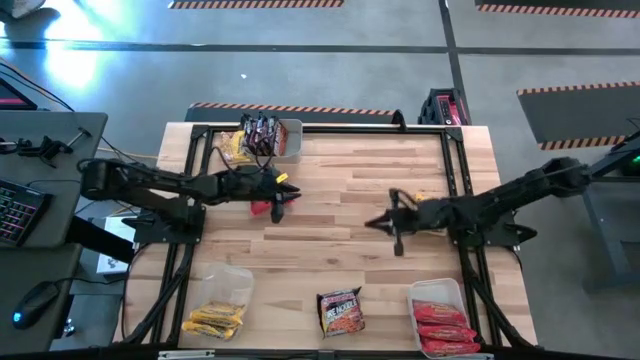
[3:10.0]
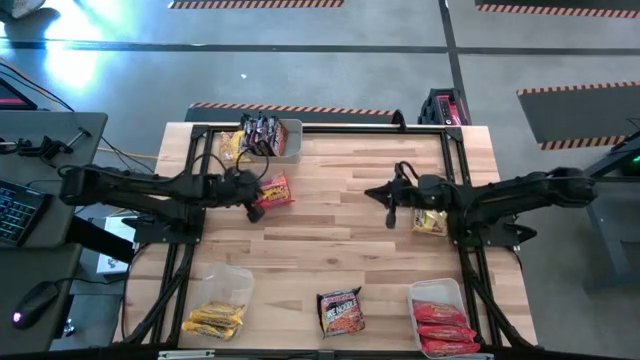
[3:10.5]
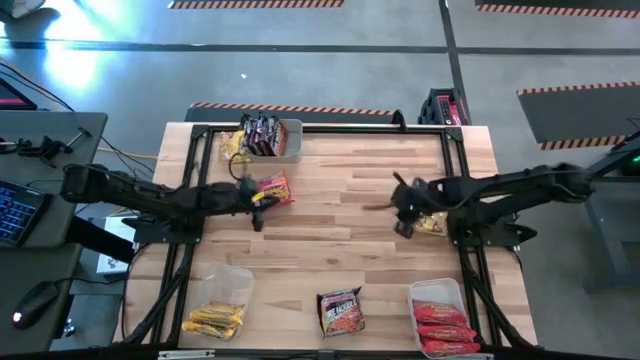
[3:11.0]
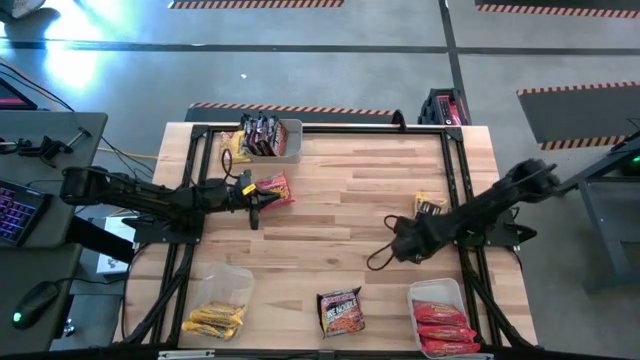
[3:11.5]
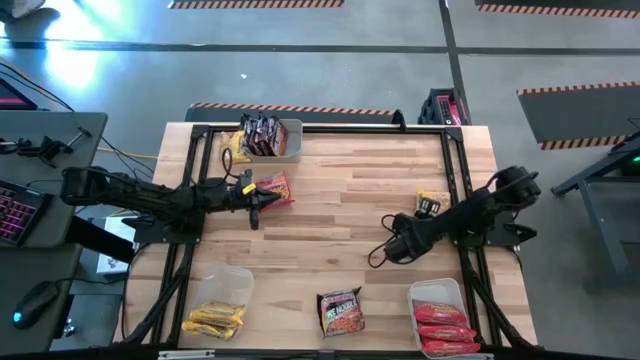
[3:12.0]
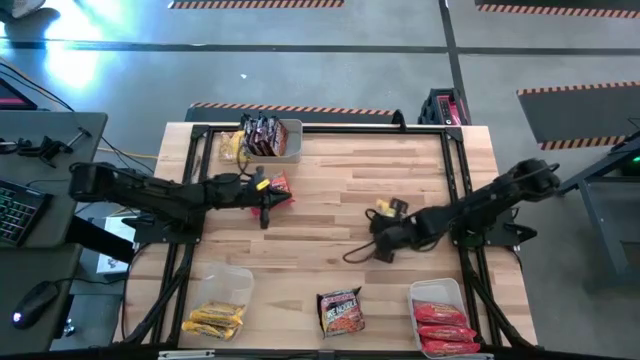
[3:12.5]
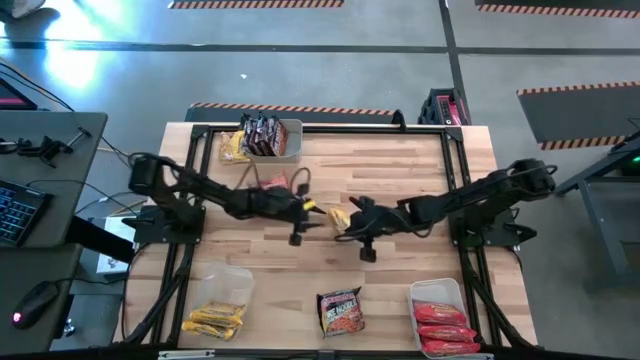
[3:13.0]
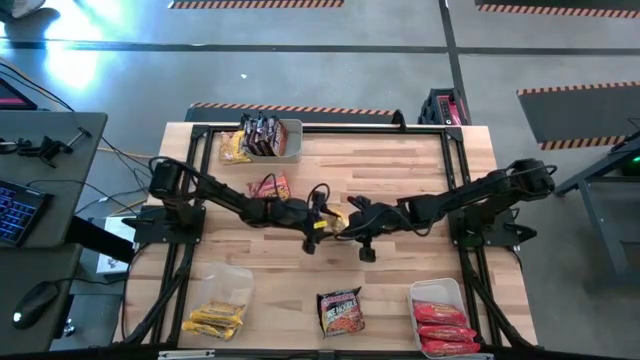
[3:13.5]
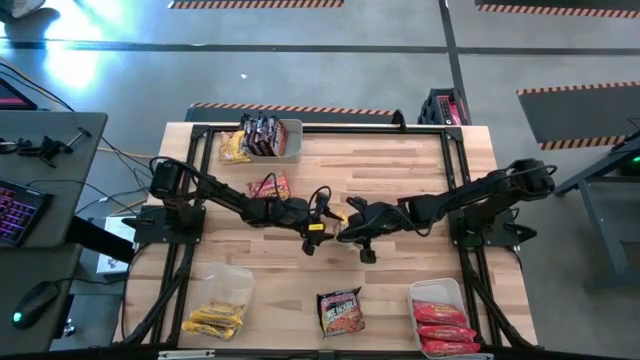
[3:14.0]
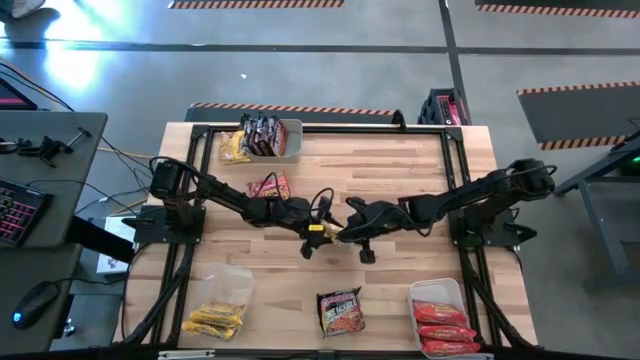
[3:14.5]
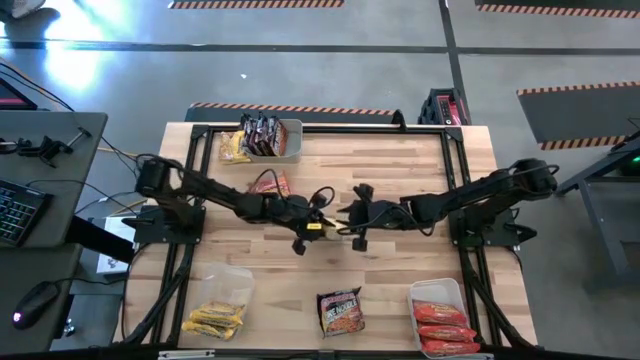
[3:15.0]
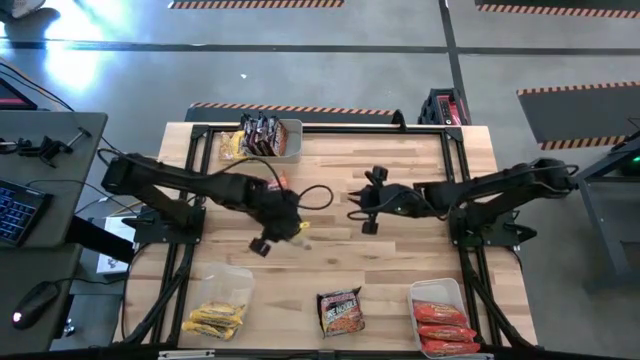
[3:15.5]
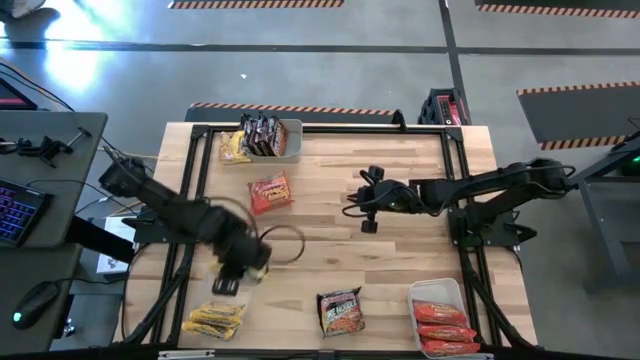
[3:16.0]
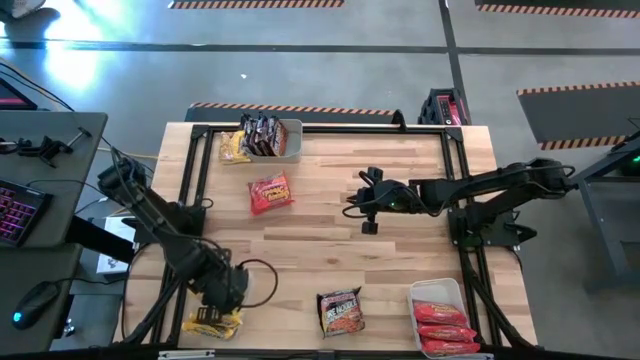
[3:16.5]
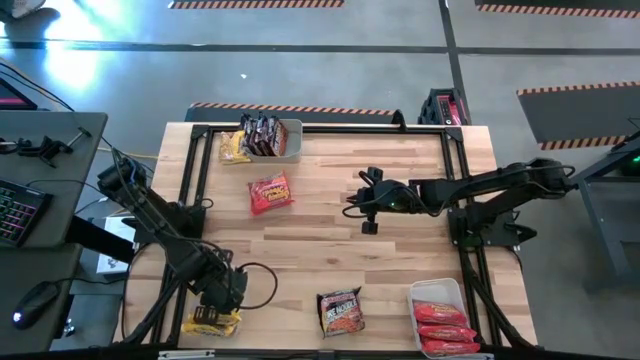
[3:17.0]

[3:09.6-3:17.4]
Task: Sort Maruchan noodles
Put the bottom yellow noodle pack into the transparent bin

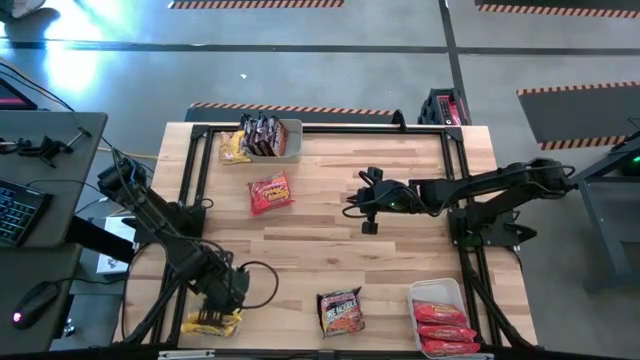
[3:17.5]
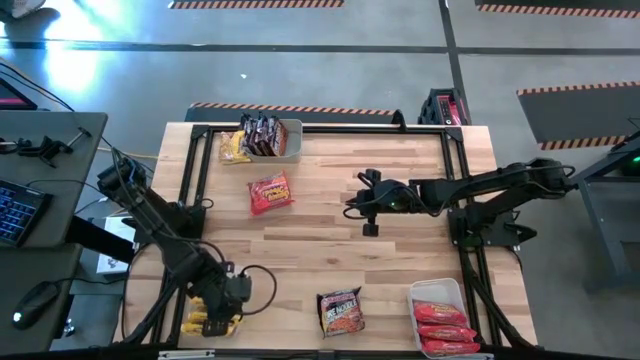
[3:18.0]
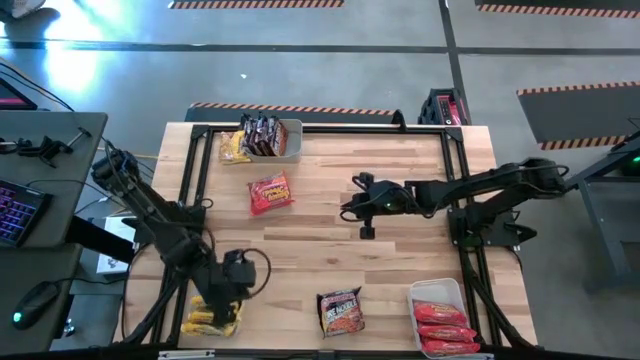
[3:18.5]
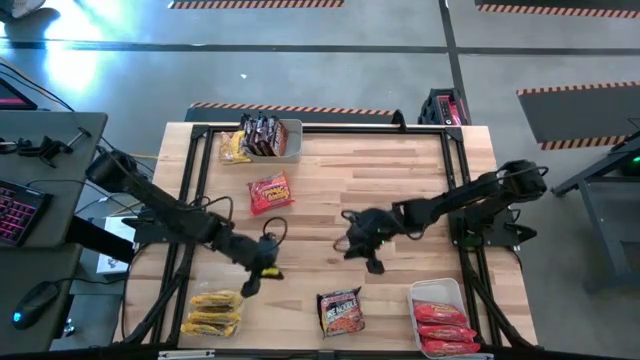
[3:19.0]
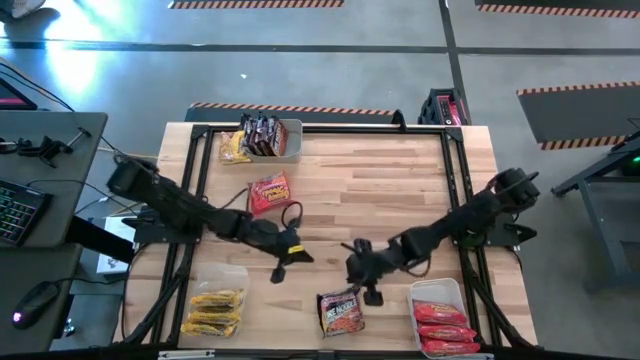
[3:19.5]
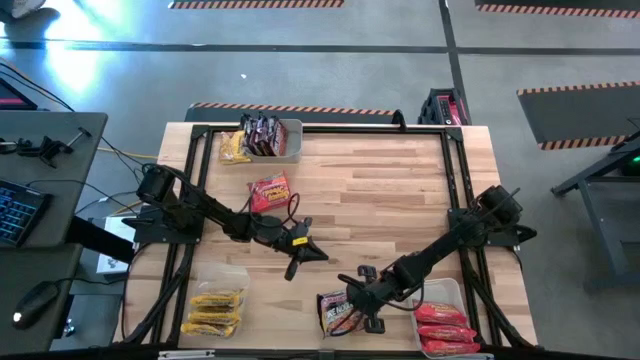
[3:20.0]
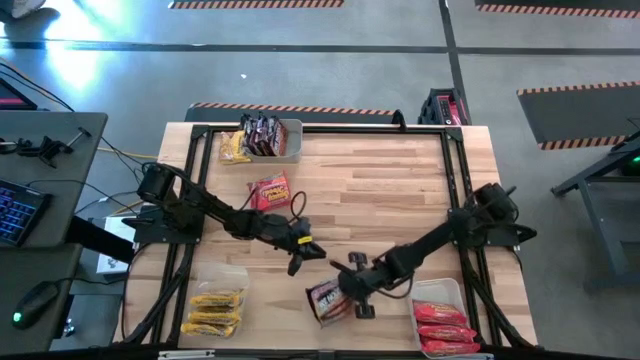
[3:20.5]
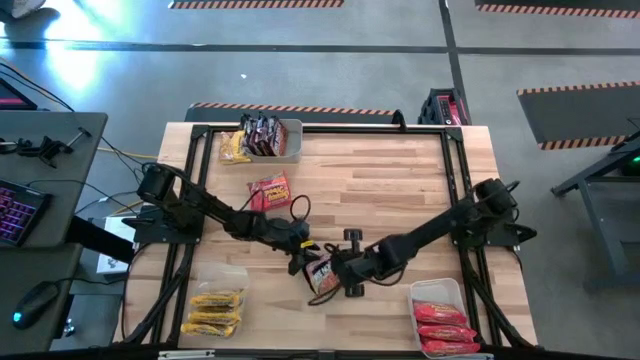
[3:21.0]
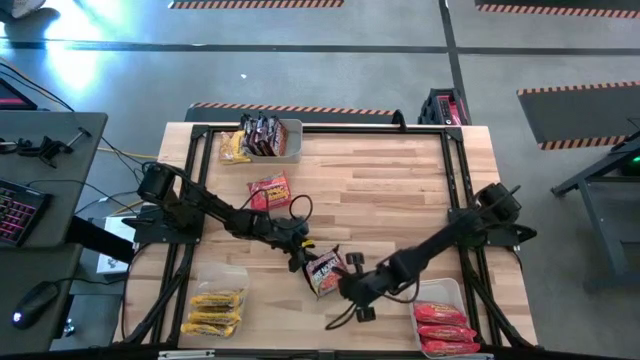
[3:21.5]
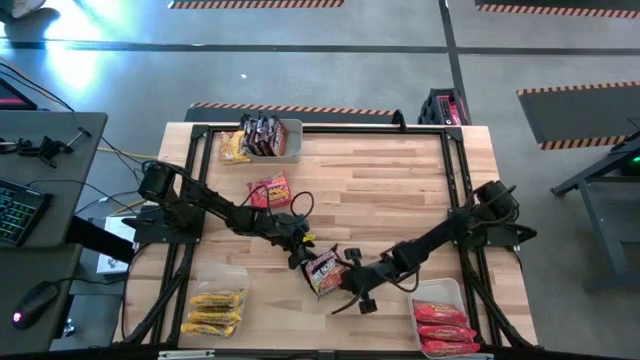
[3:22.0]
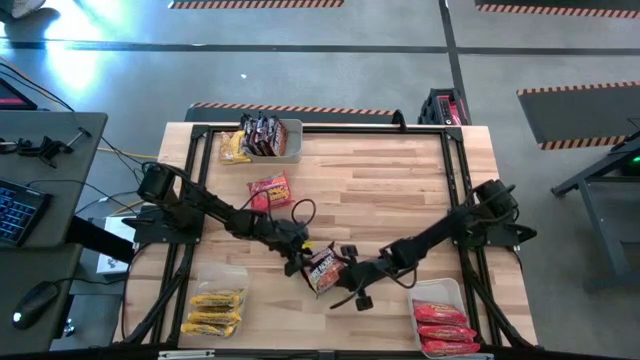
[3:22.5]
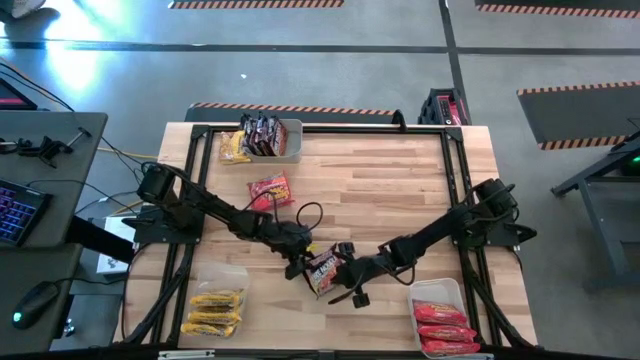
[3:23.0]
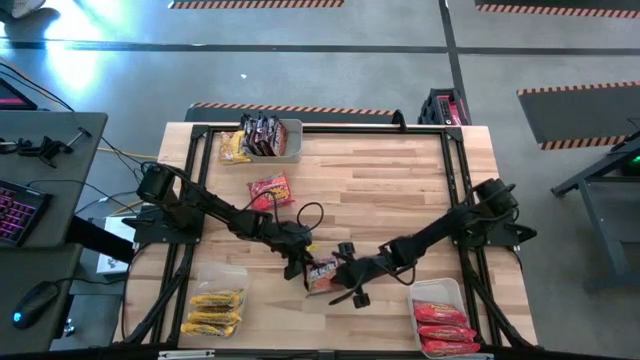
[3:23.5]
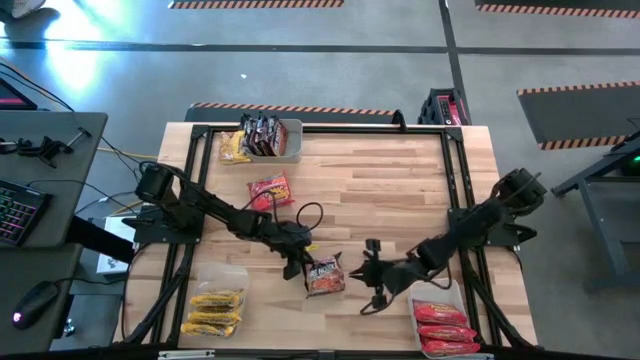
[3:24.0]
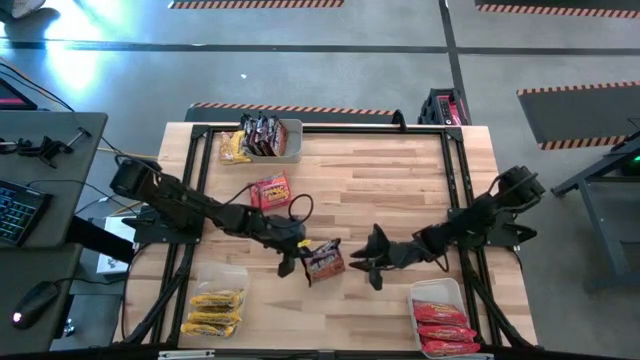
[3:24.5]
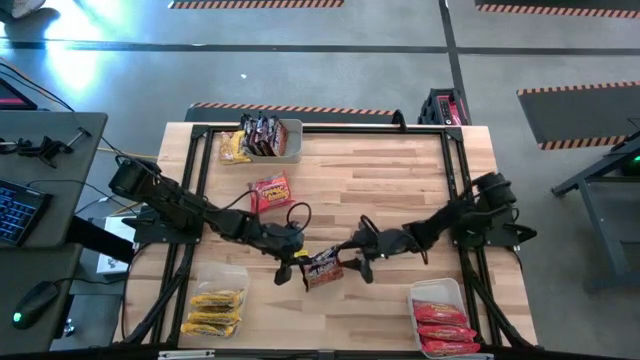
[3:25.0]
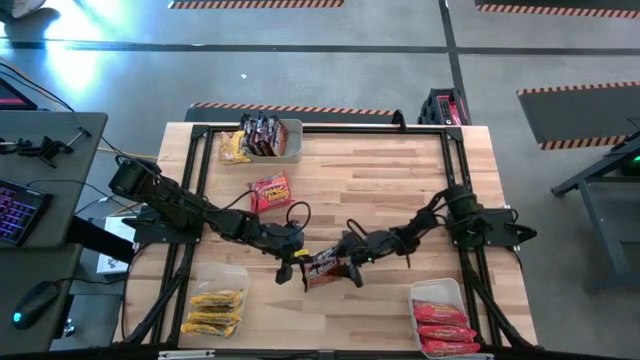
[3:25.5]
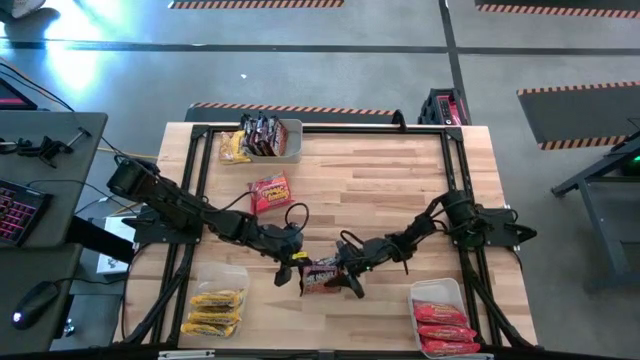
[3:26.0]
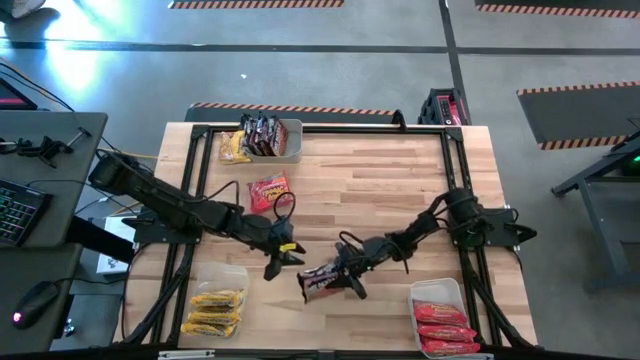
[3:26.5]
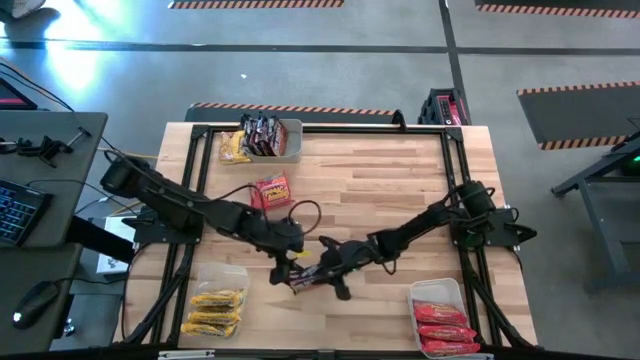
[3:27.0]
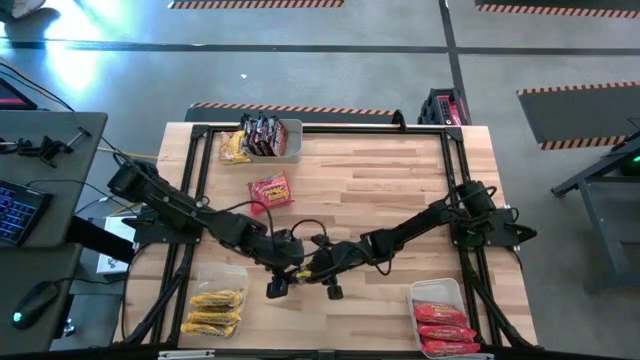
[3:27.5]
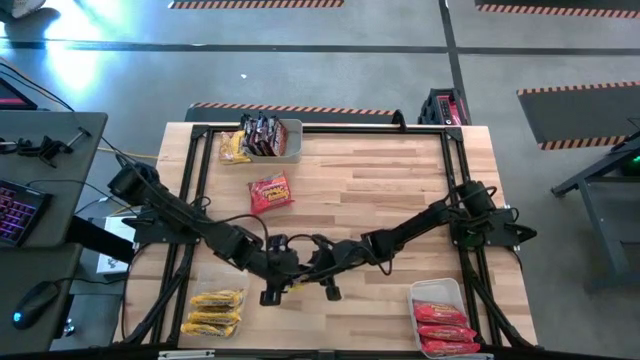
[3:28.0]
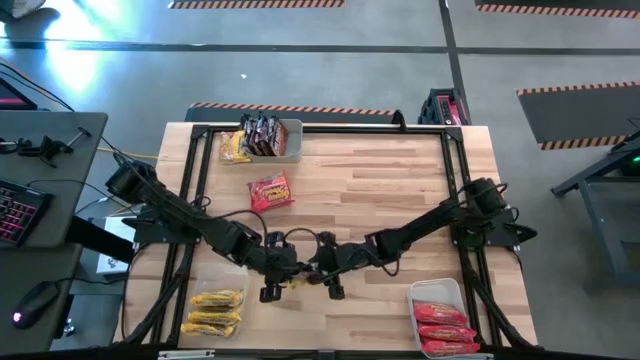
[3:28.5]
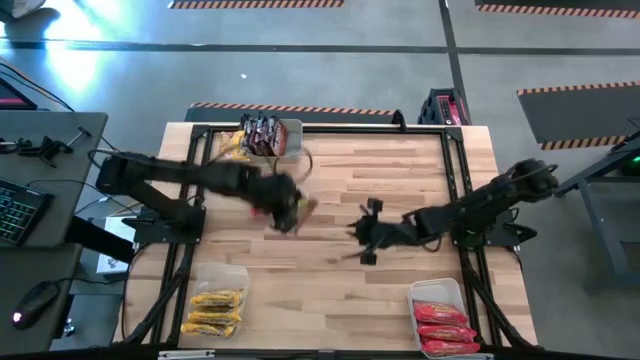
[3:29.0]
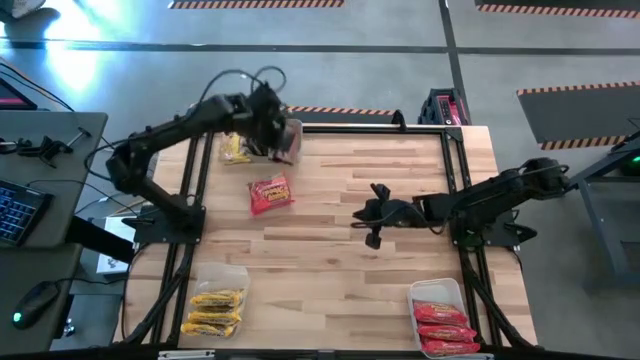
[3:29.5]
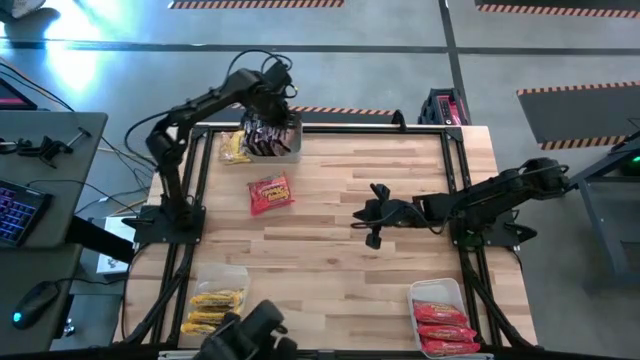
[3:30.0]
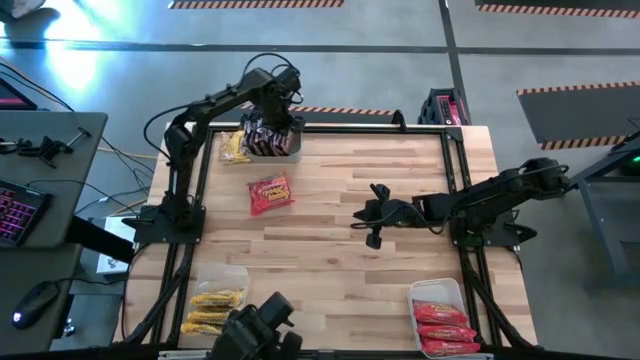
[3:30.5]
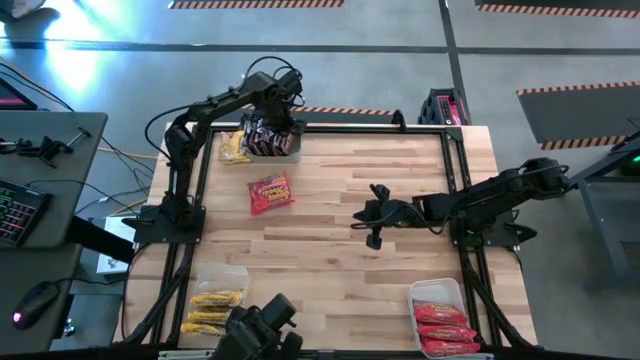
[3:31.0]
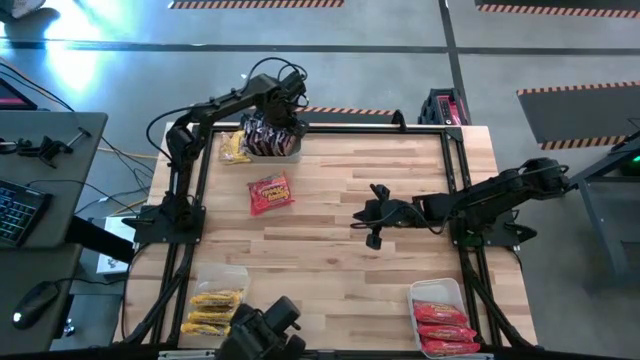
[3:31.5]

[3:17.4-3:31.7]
Put the black noodle pack into the gray bin
